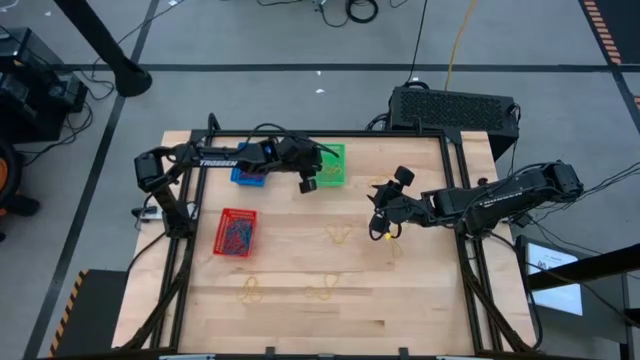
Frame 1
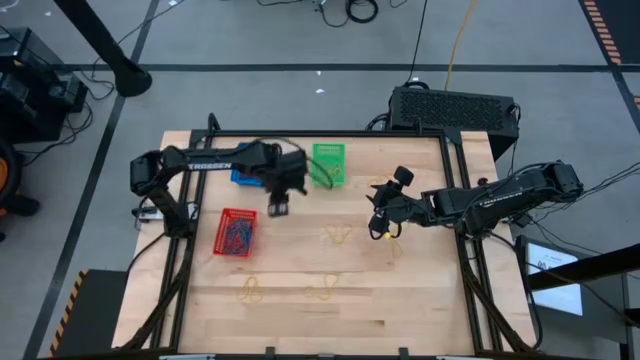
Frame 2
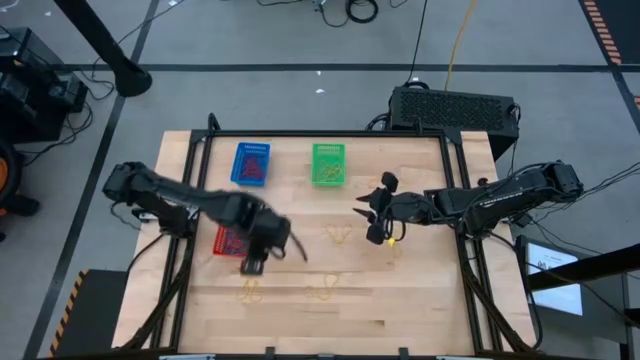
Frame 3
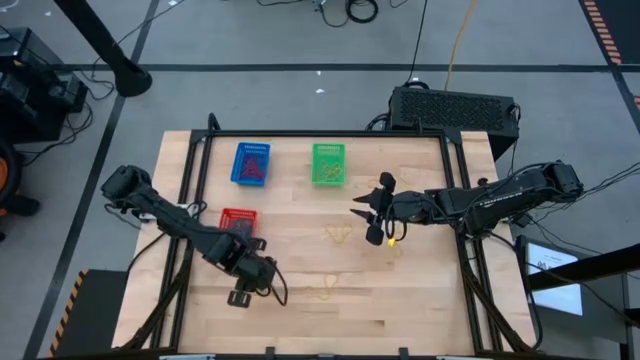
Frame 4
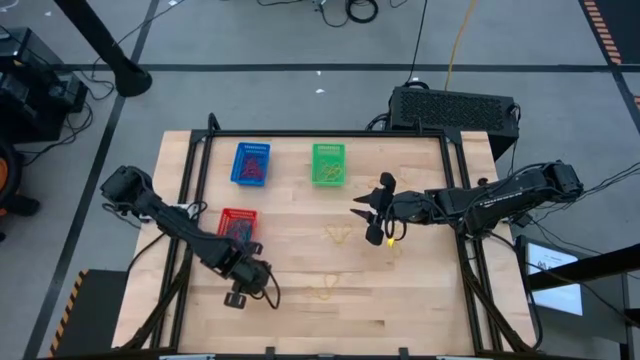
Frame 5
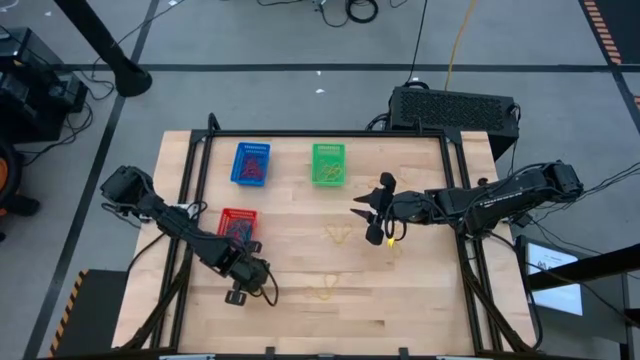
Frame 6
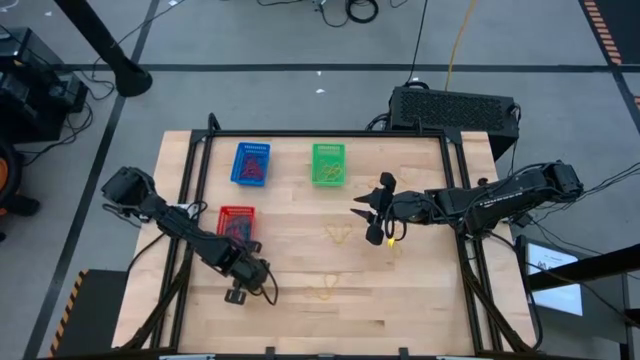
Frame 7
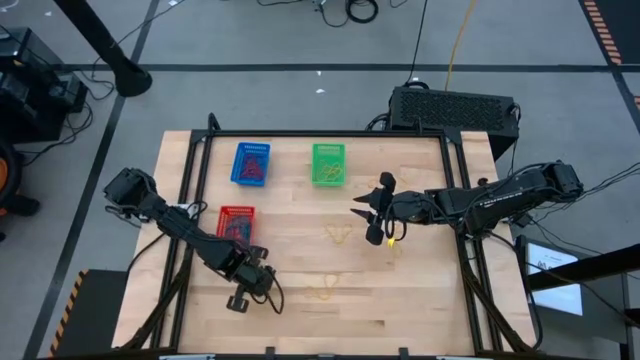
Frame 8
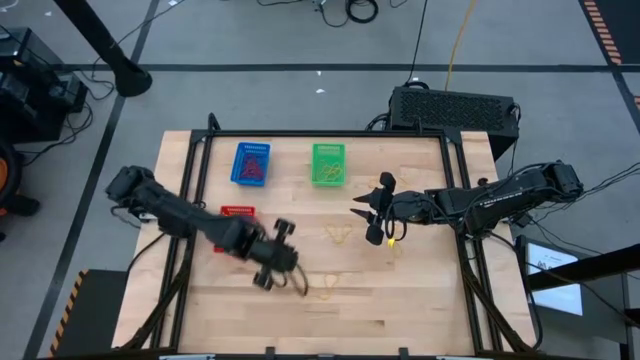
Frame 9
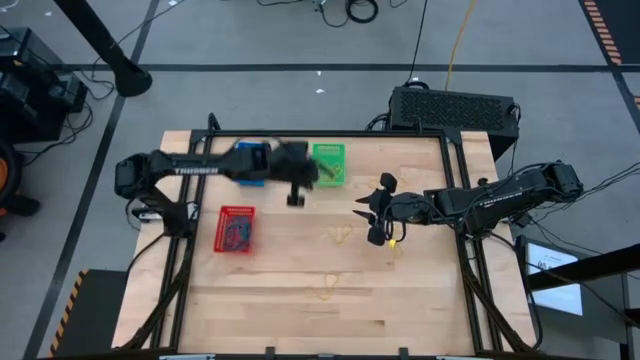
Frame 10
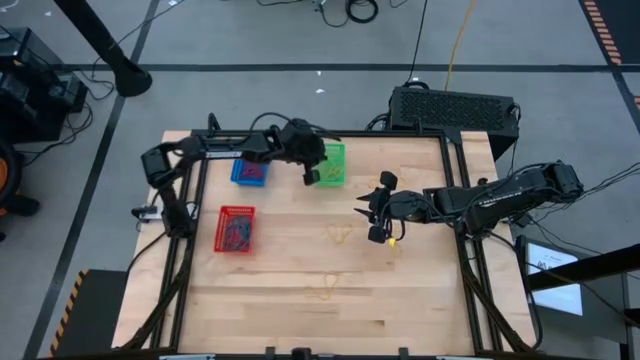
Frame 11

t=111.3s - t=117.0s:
Task: Sort rubber bands into baskets
Put the yellow rubber band into the green basket

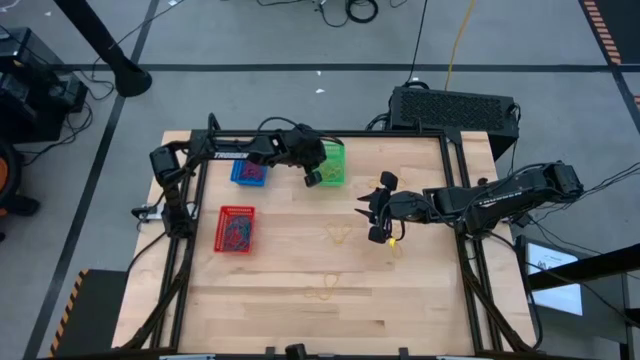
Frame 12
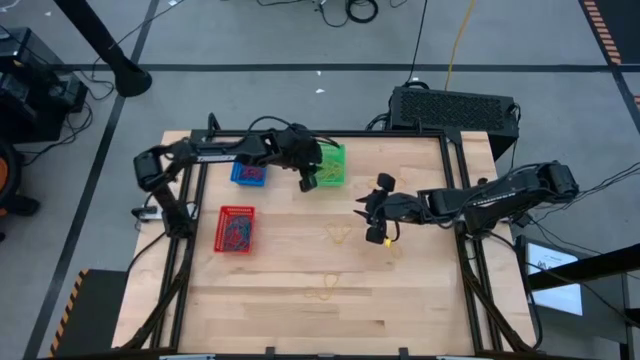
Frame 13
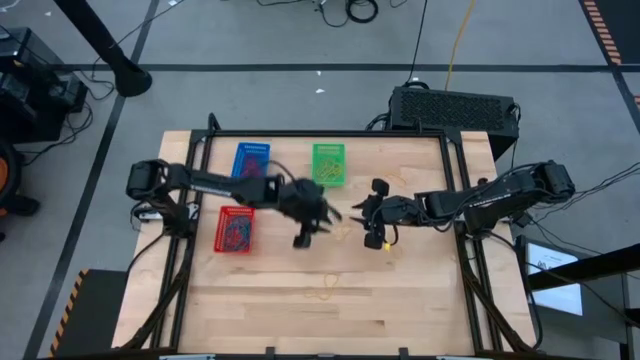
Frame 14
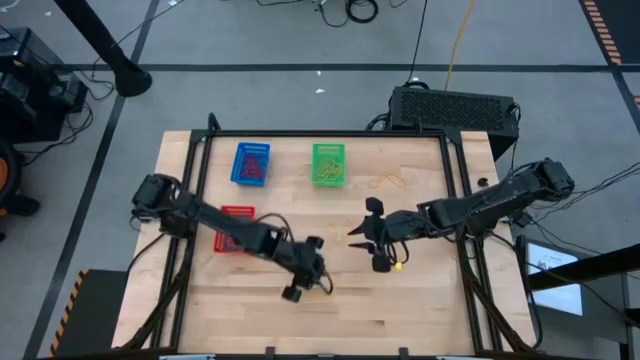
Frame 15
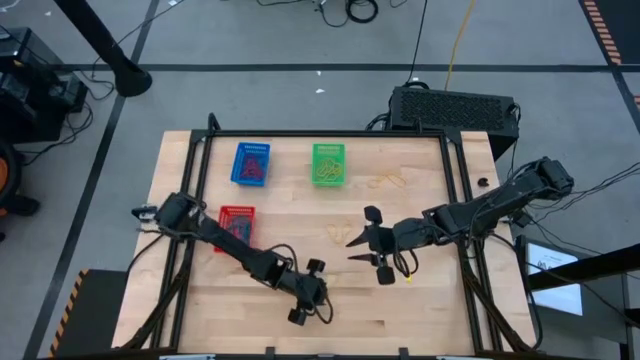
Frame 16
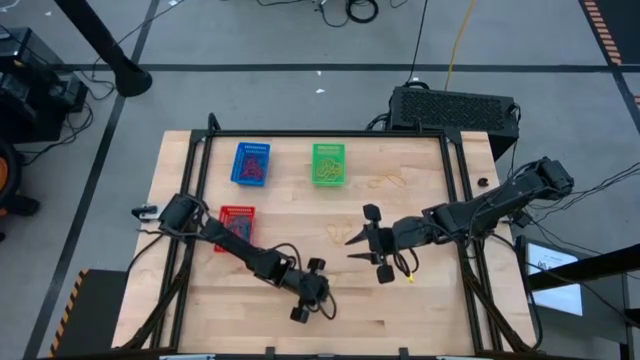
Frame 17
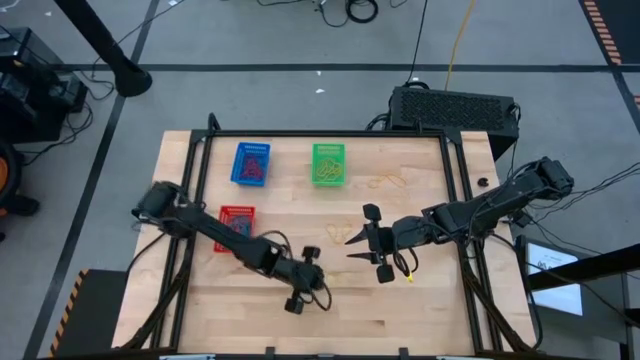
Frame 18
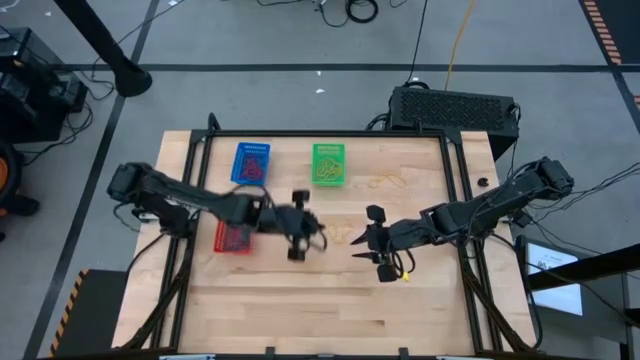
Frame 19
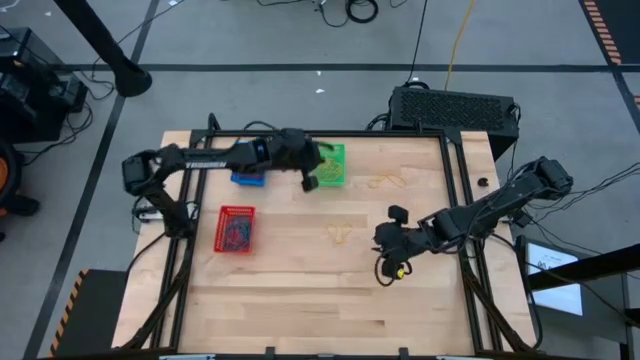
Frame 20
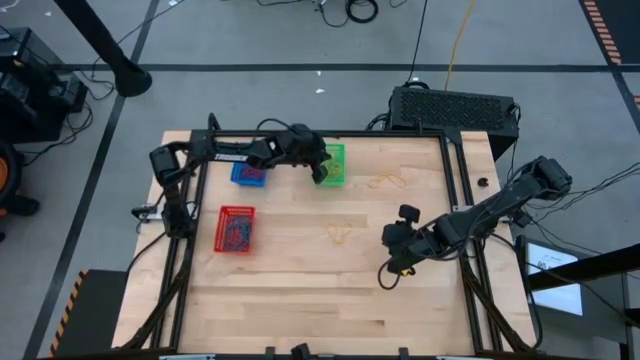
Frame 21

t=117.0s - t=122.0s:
Put the yellow rubber band into the green basket

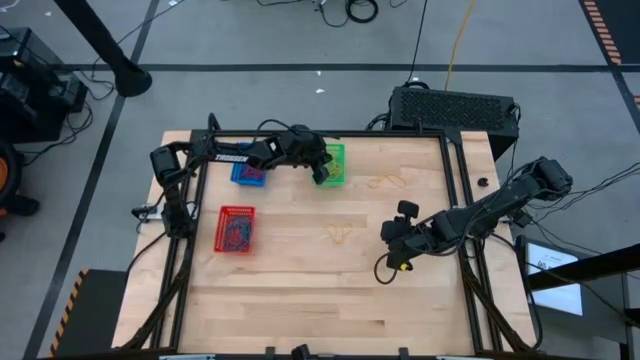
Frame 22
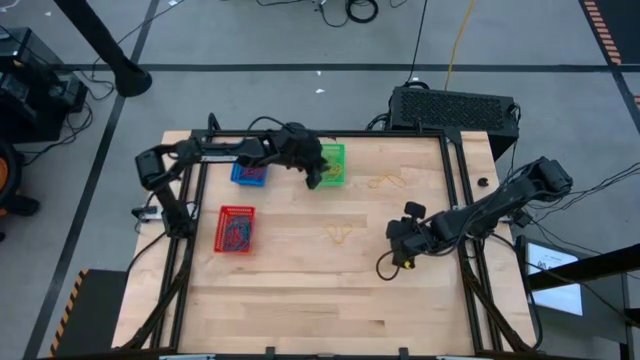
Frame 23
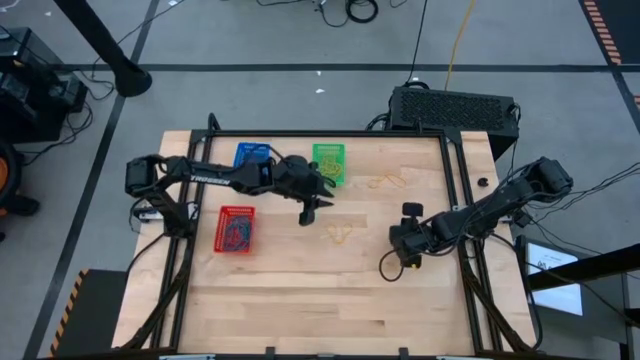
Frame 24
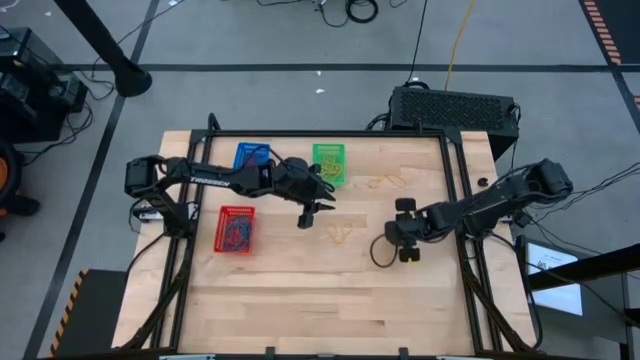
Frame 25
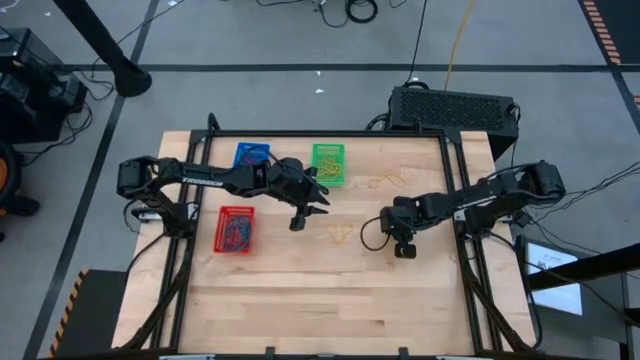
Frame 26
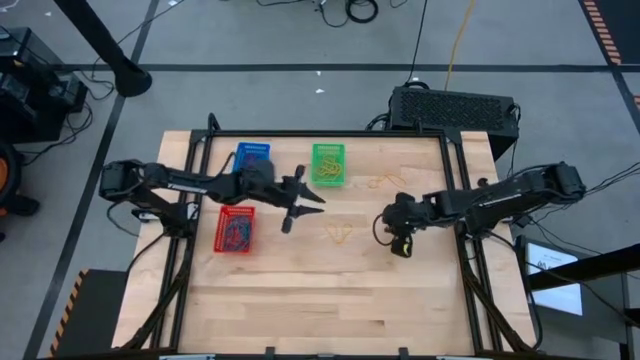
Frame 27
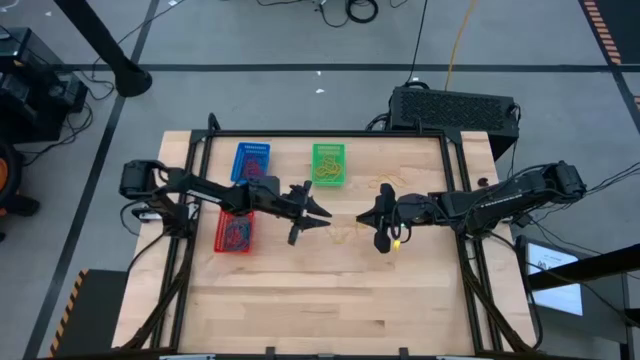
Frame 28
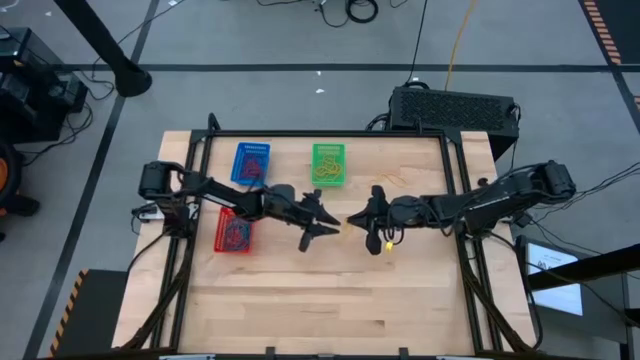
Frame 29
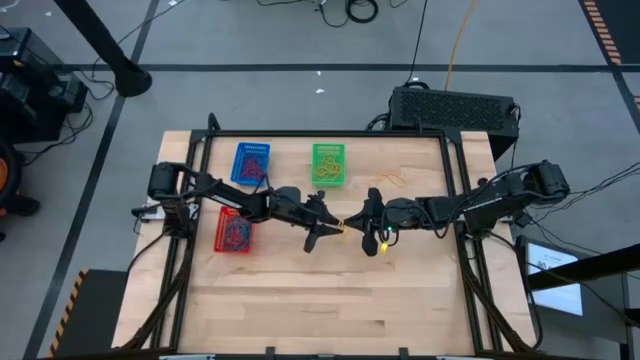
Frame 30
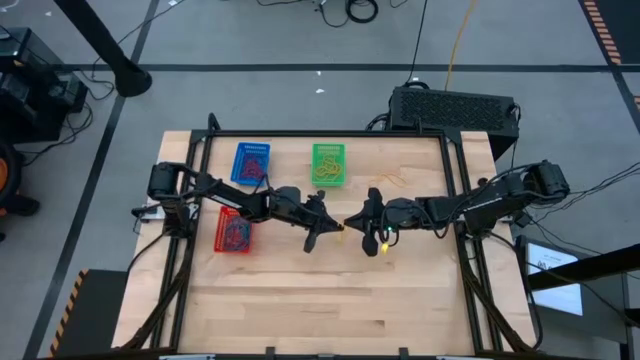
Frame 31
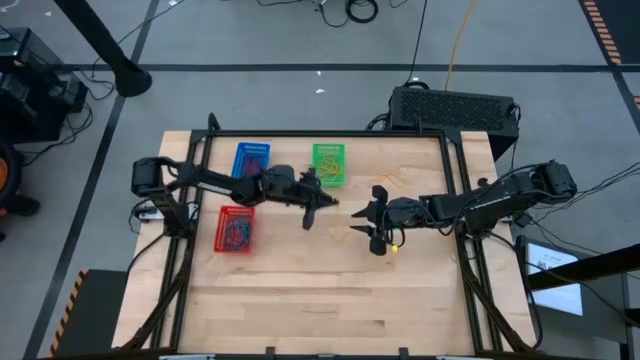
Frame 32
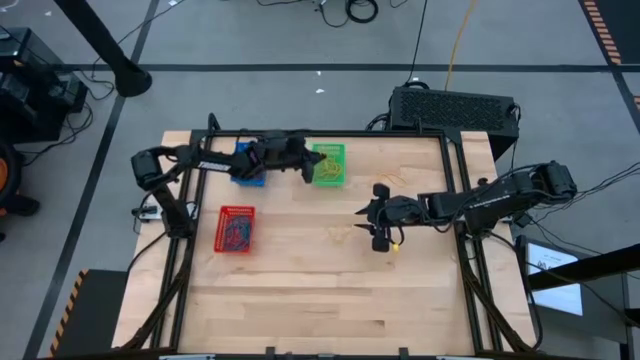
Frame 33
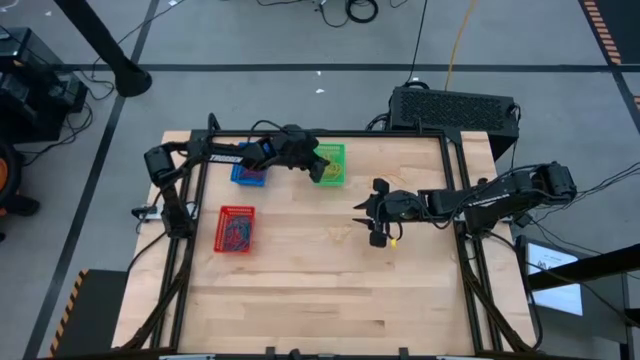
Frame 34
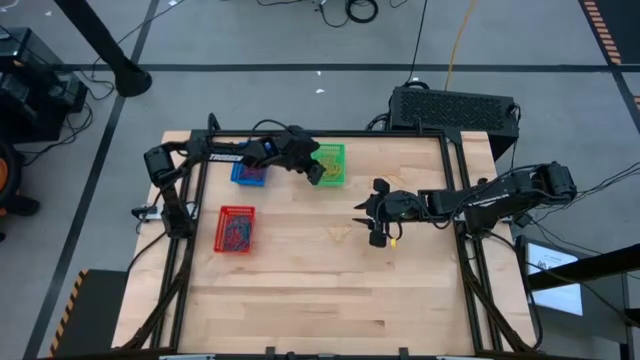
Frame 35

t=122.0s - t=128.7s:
Put the yellow rubber band into the green basket

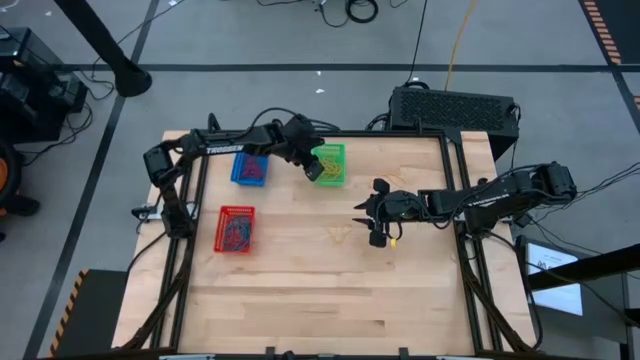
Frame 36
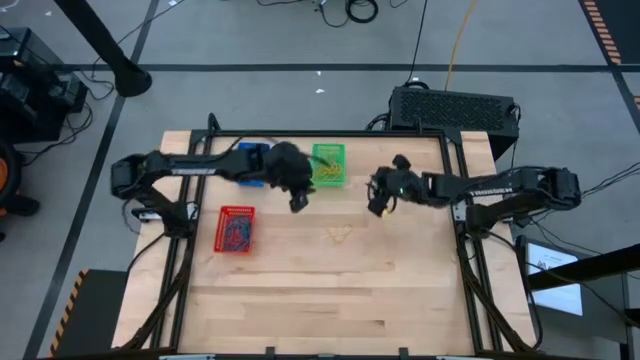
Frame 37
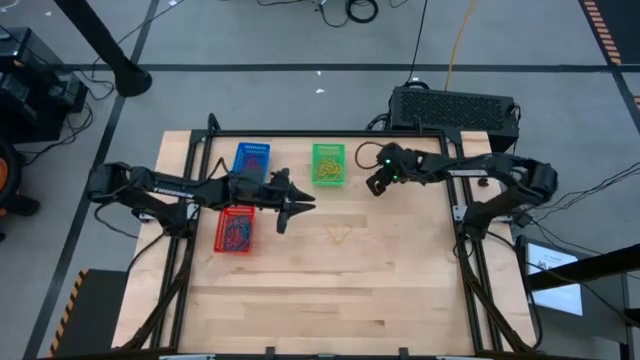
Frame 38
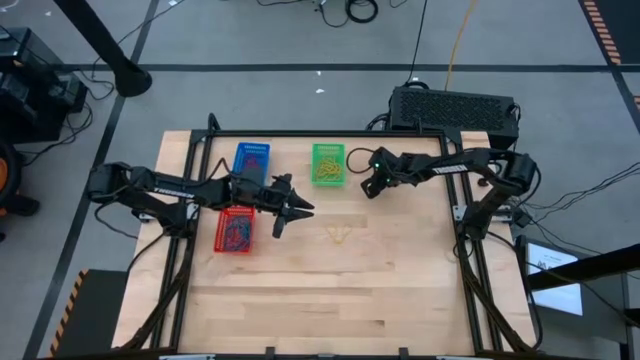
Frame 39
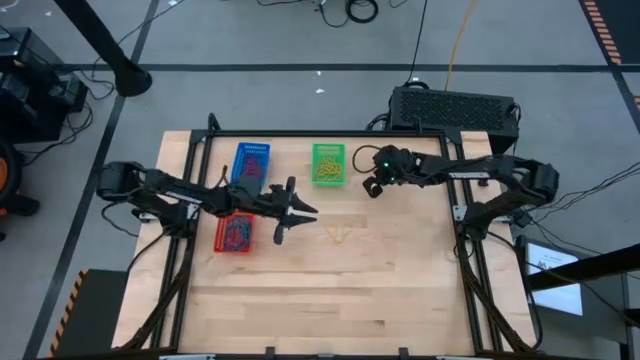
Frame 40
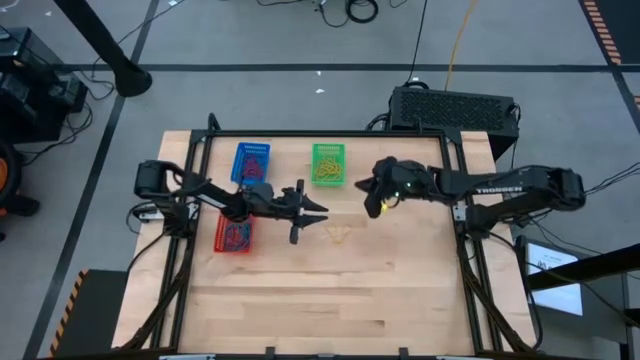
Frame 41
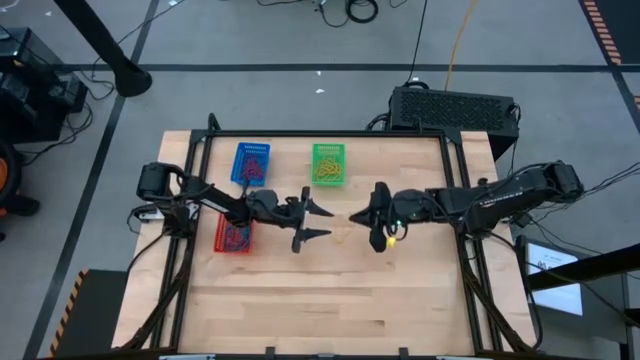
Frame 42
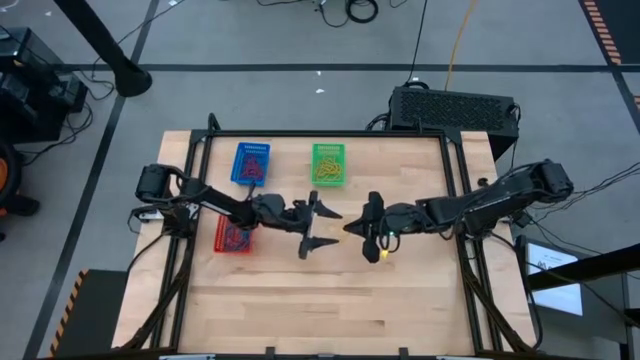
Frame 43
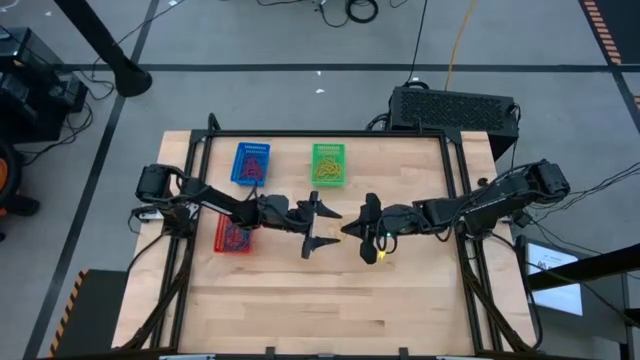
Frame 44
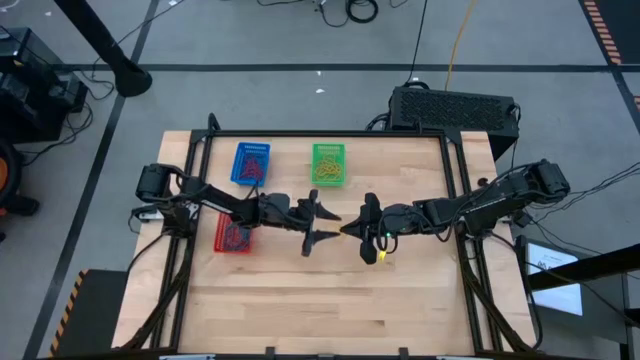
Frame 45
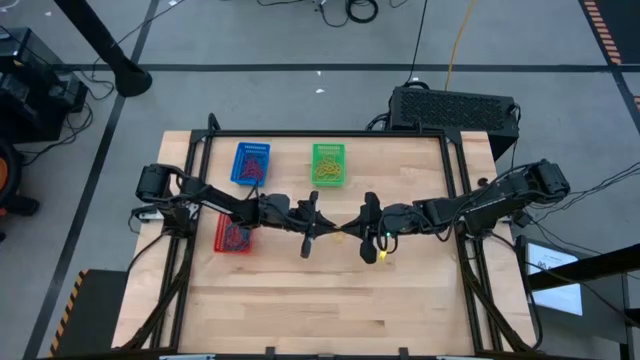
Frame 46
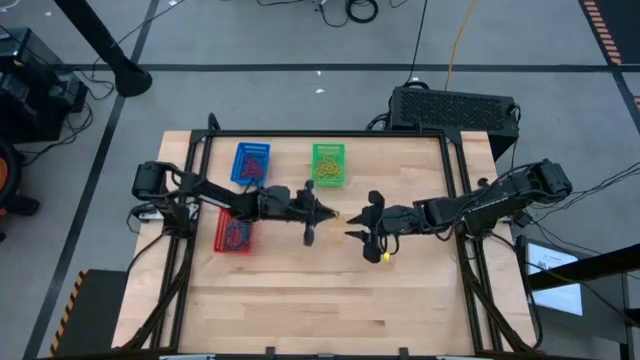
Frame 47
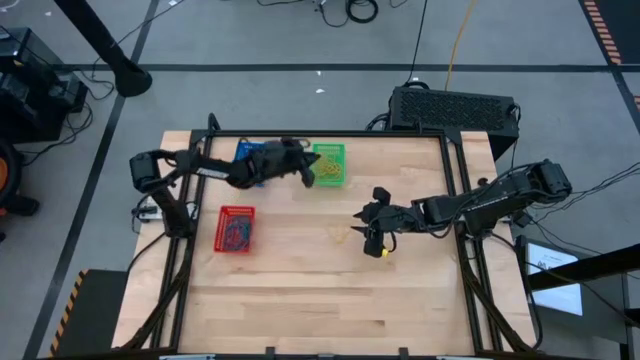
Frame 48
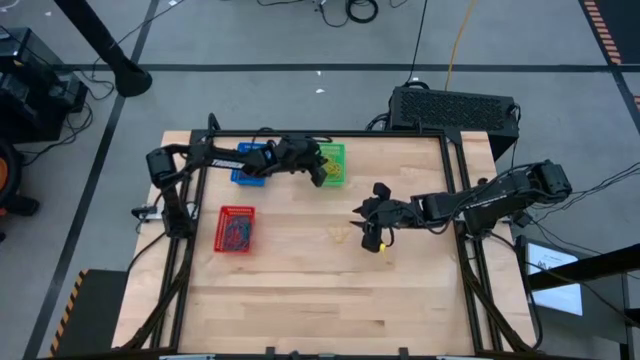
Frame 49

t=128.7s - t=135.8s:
Put the yellow rubber band into the green basket
